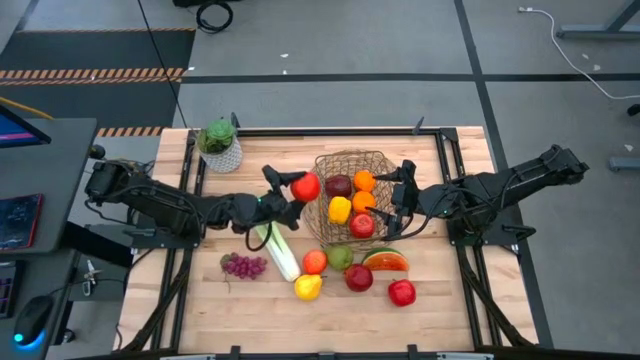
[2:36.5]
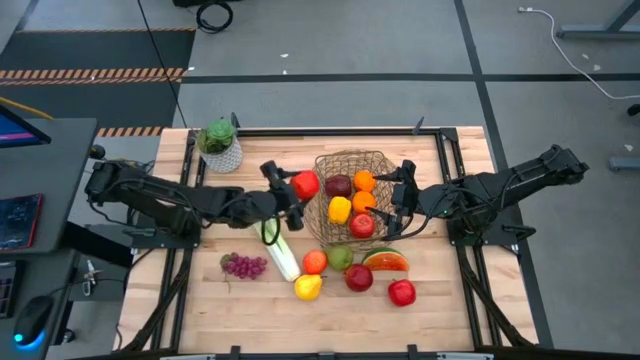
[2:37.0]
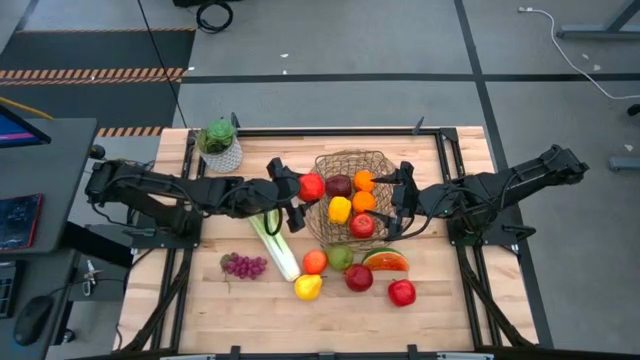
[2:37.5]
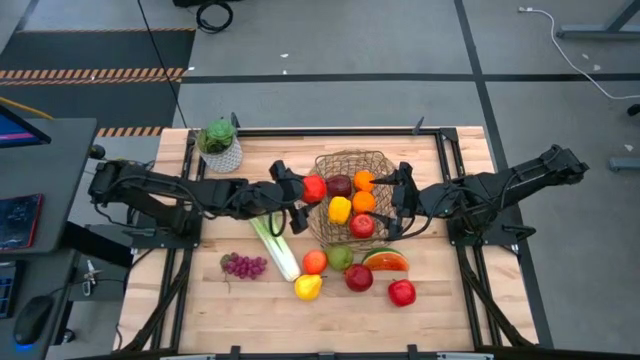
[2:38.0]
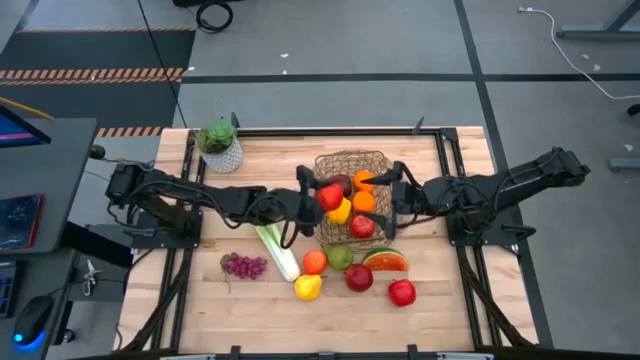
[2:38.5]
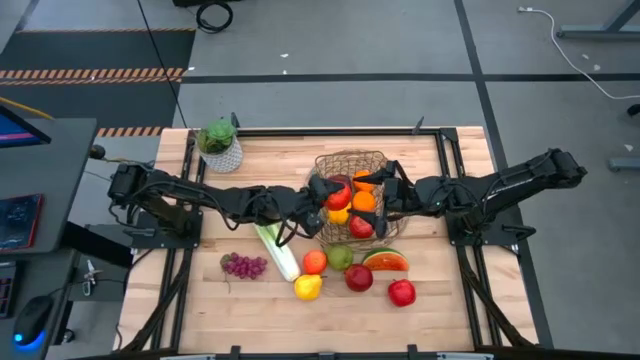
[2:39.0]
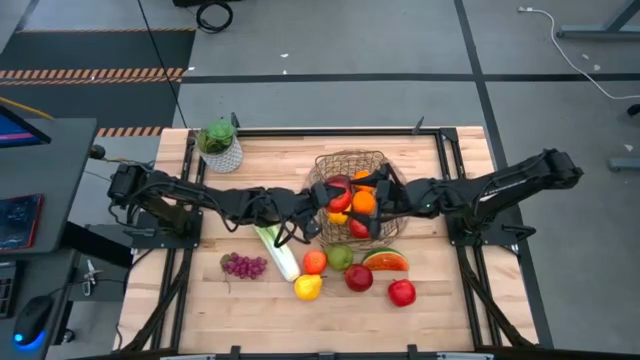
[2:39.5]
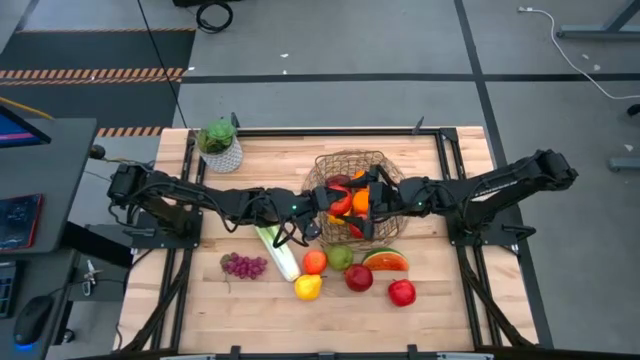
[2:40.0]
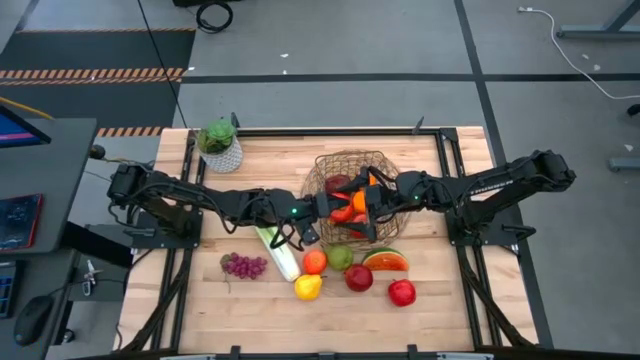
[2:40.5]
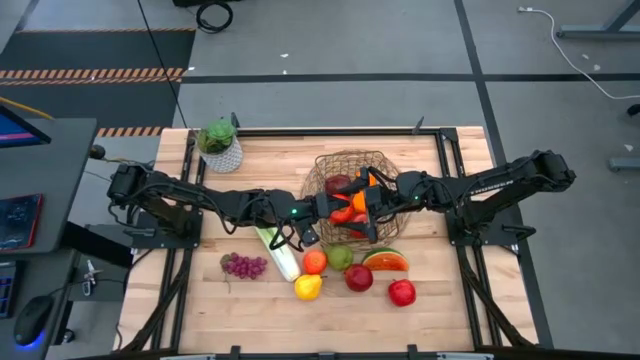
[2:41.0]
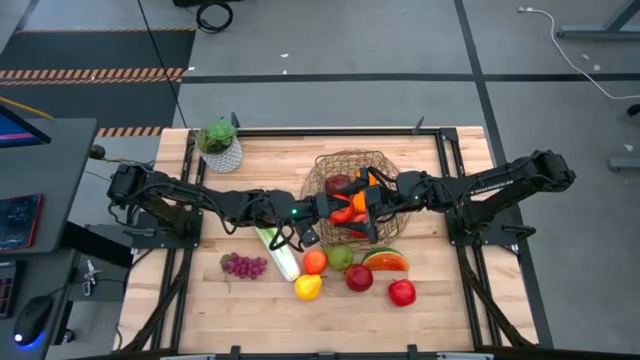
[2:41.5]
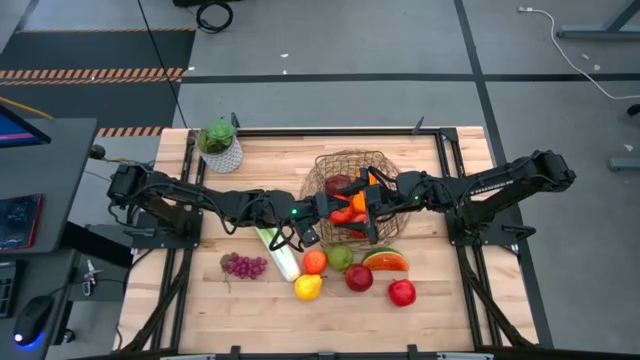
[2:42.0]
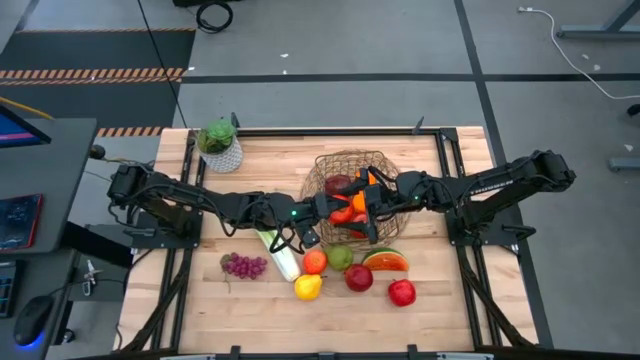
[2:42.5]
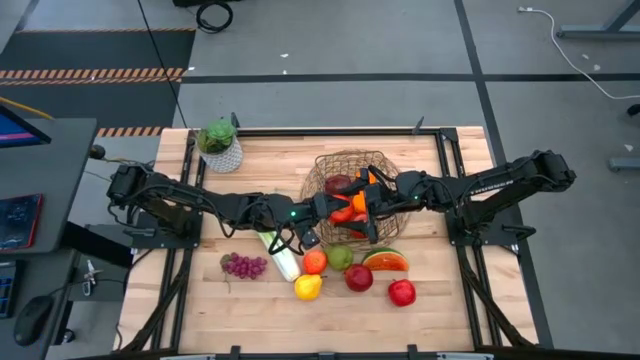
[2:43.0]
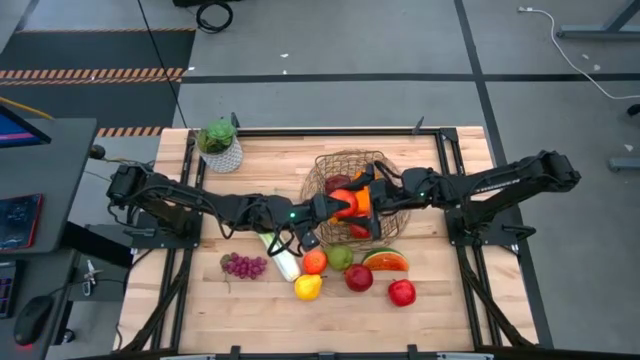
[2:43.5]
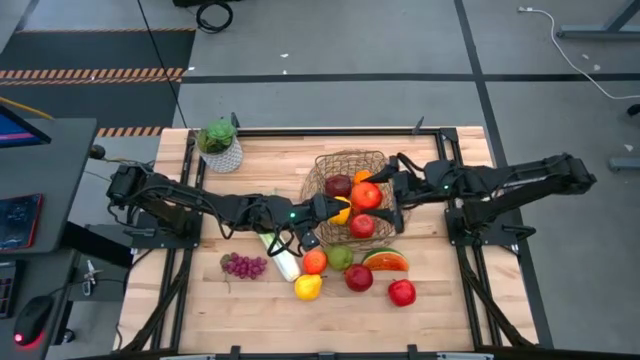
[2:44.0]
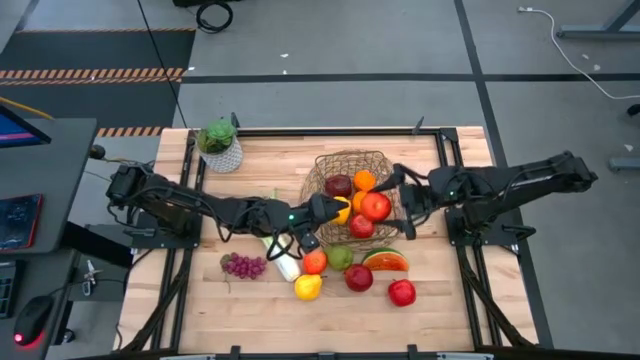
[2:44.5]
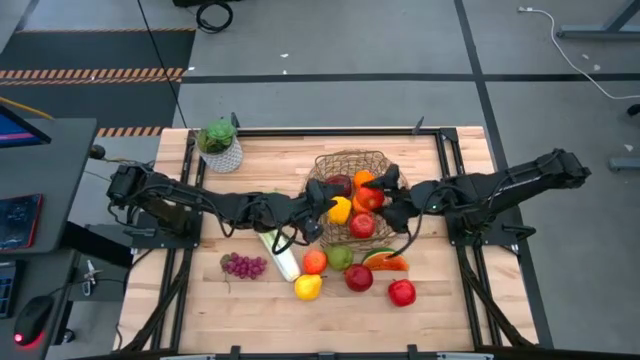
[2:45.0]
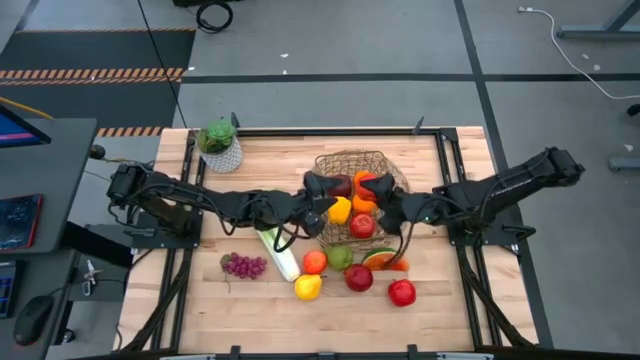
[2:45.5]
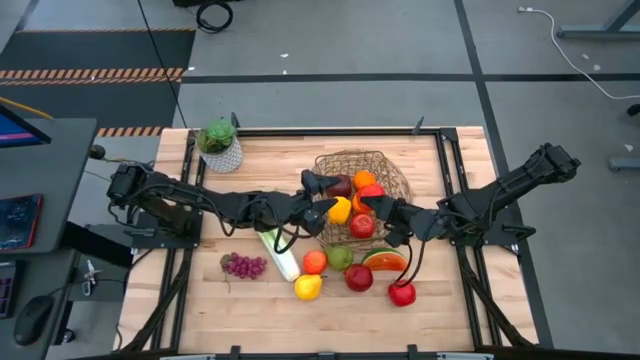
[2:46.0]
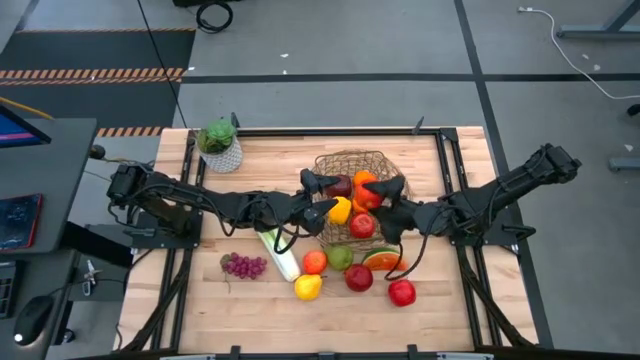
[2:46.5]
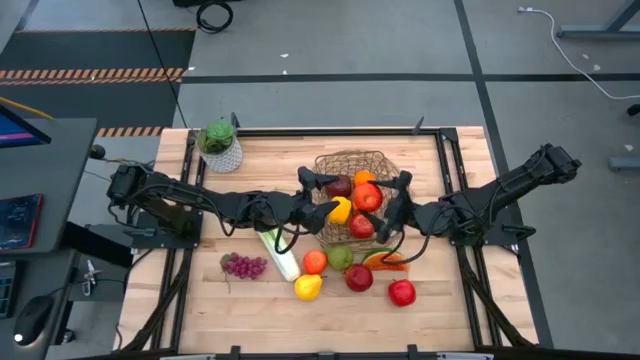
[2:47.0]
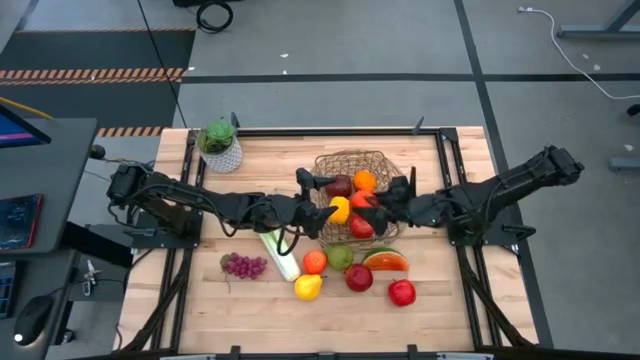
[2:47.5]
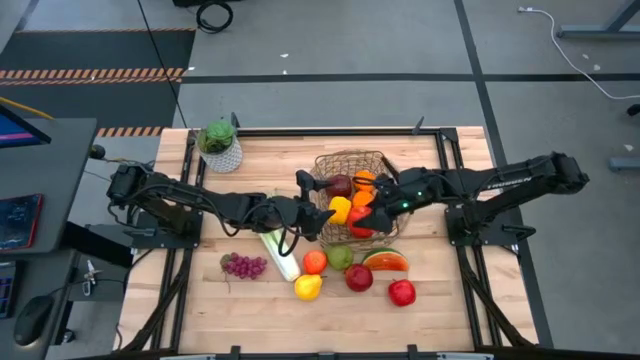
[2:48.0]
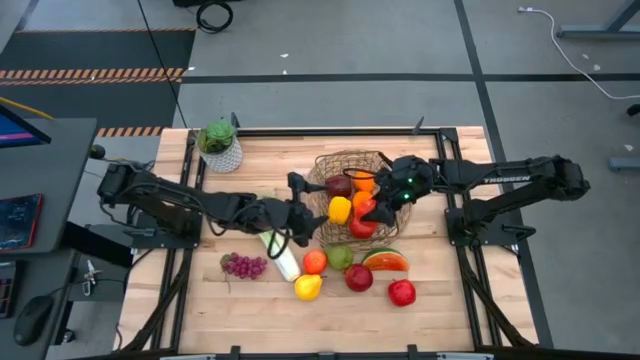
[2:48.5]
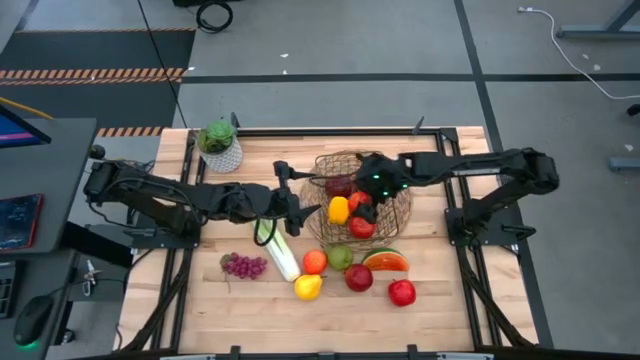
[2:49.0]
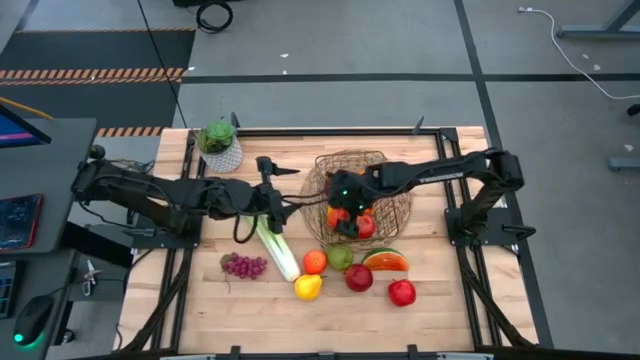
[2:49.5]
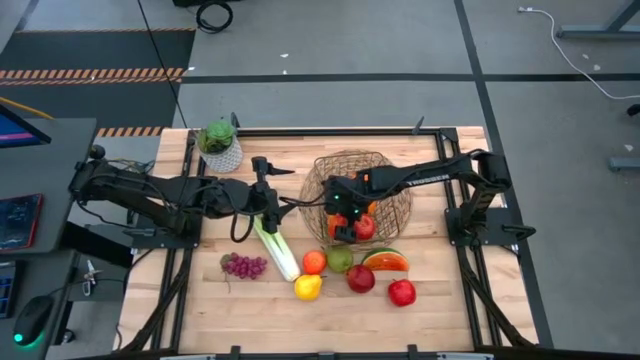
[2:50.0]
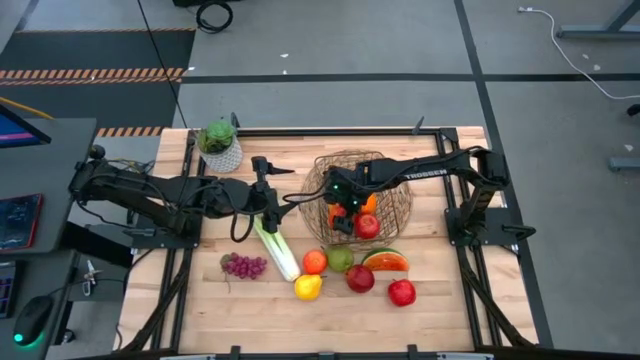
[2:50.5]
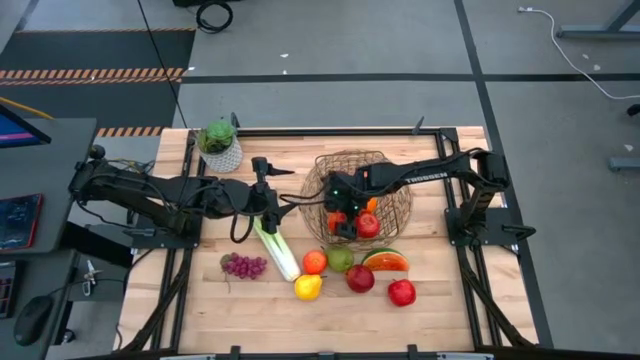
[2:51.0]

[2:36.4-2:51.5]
Task: Build produce basket
Put the red apple into the brown wire basket

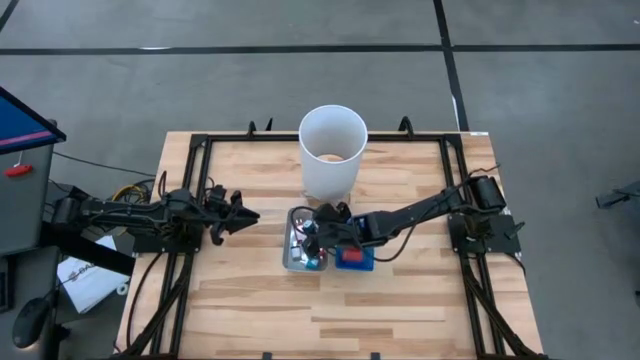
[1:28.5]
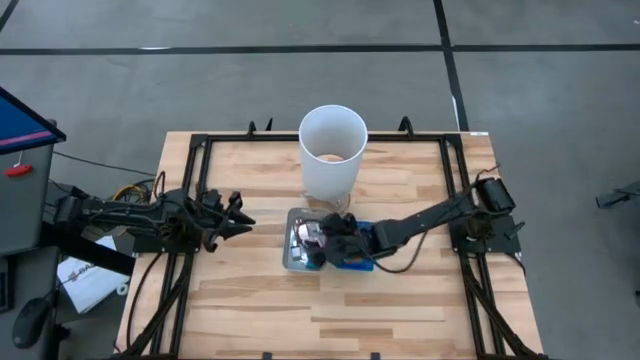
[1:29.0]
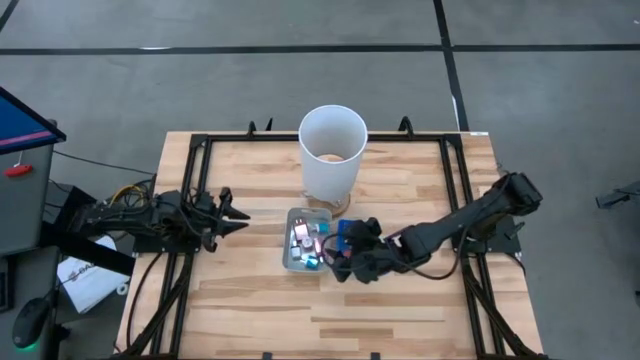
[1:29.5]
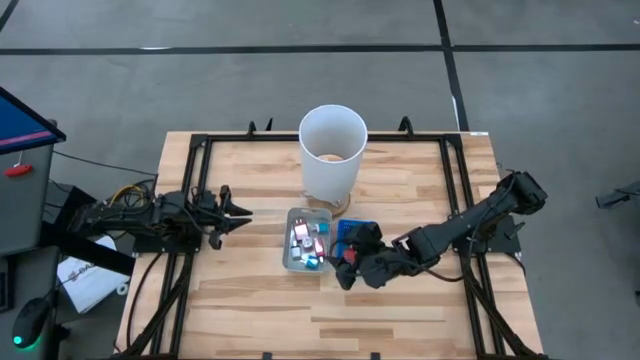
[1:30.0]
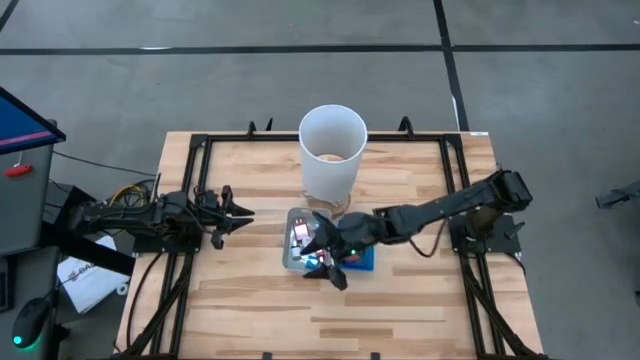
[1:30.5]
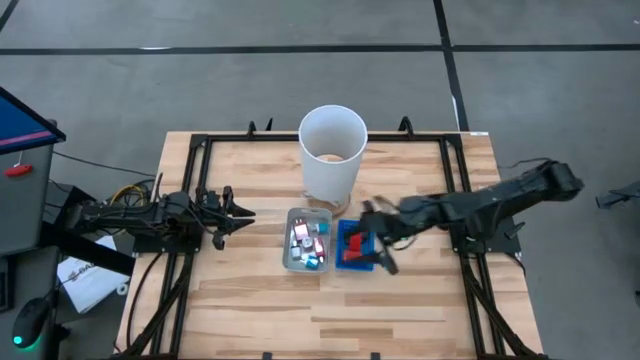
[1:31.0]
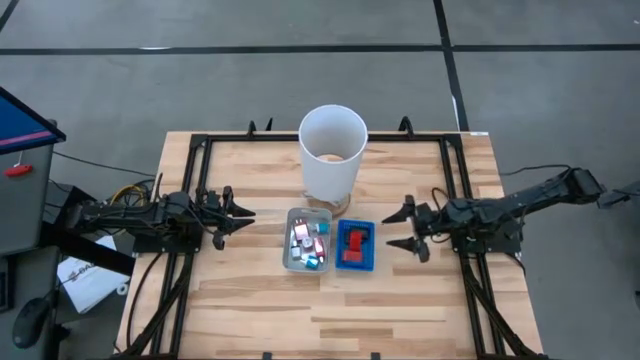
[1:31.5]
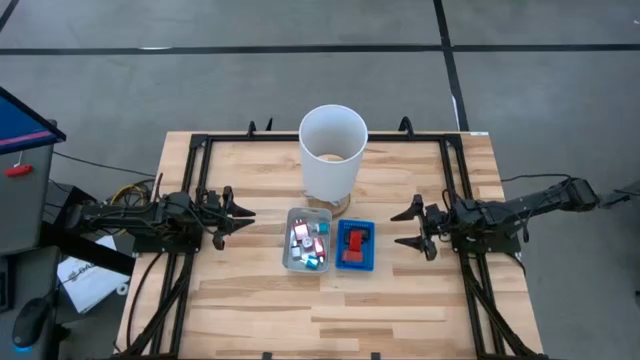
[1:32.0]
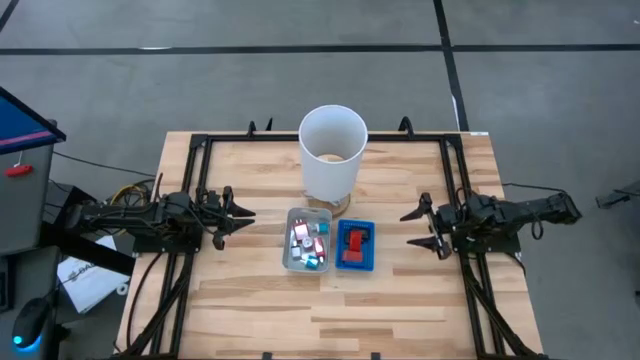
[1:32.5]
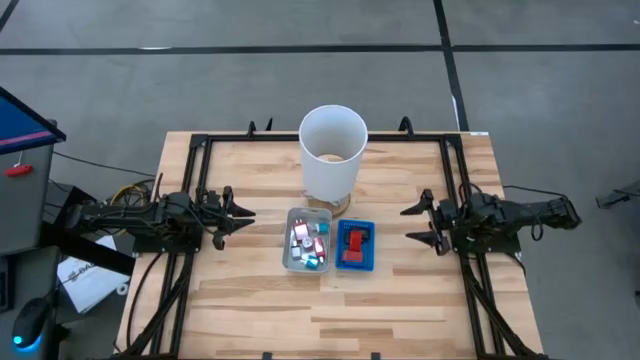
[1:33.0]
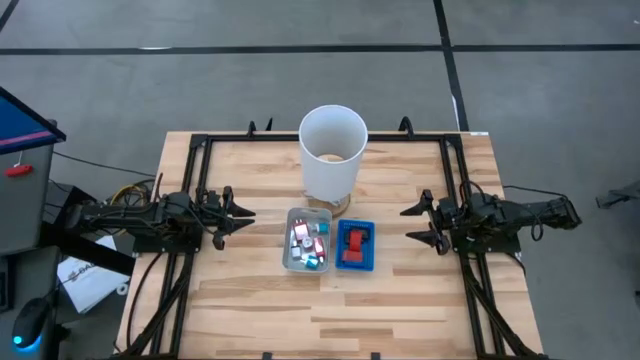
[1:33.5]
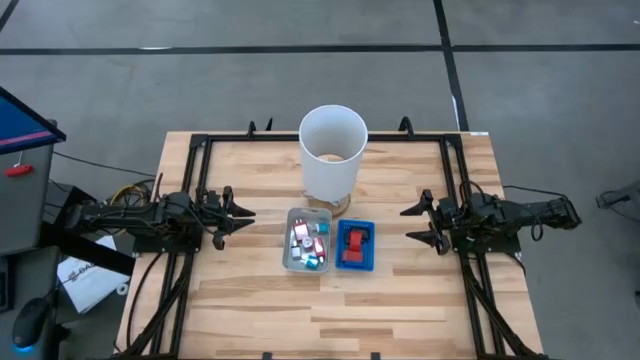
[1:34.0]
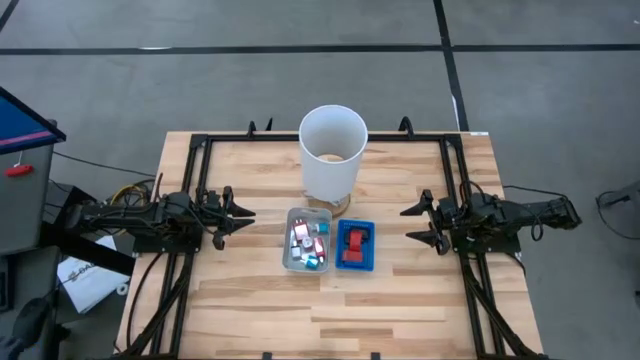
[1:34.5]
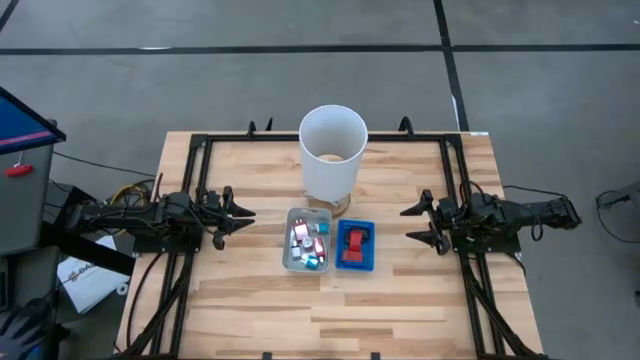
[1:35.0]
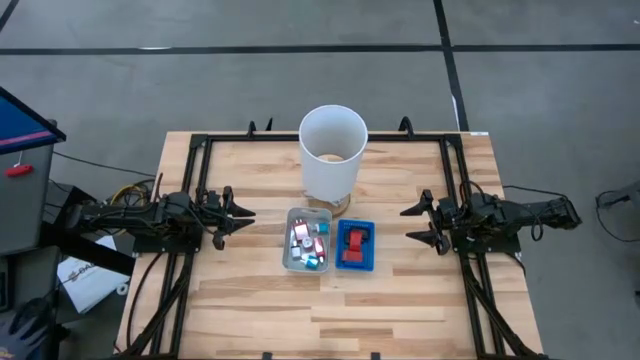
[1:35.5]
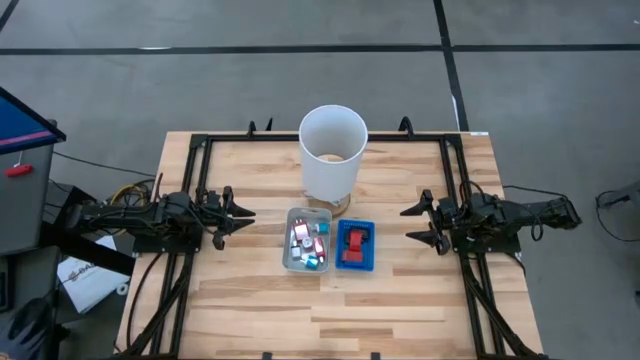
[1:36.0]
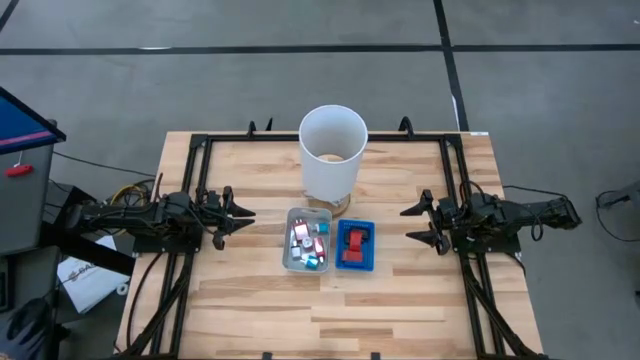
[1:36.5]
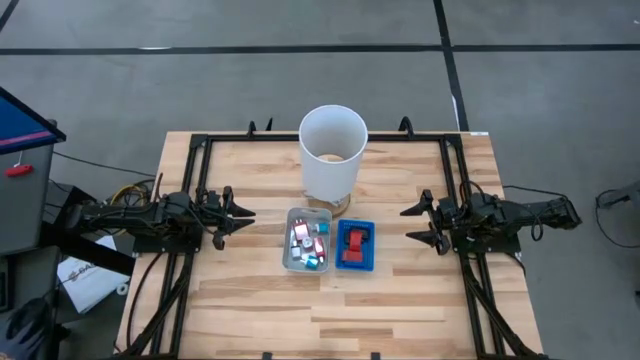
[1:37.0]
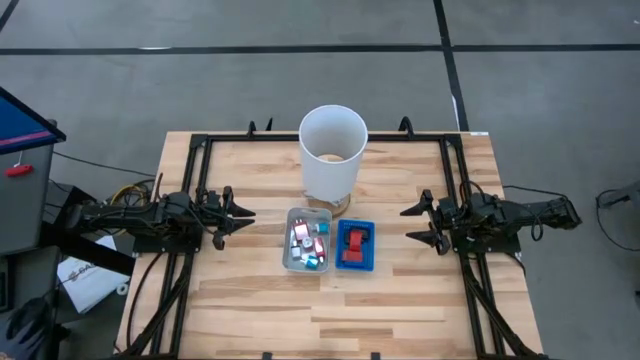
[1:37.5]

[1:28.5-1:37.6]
Task: Pick & Place Office items
Return to Home Position
